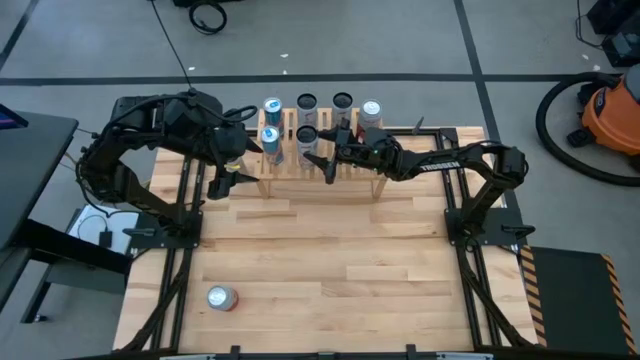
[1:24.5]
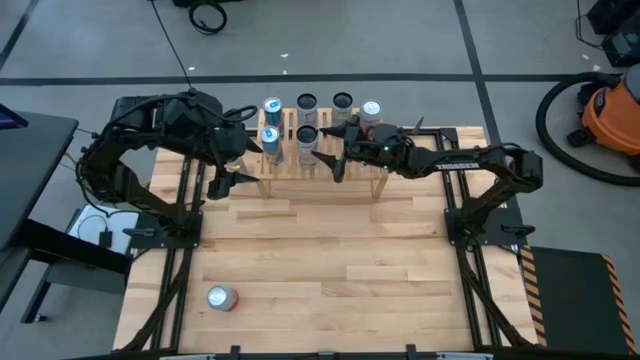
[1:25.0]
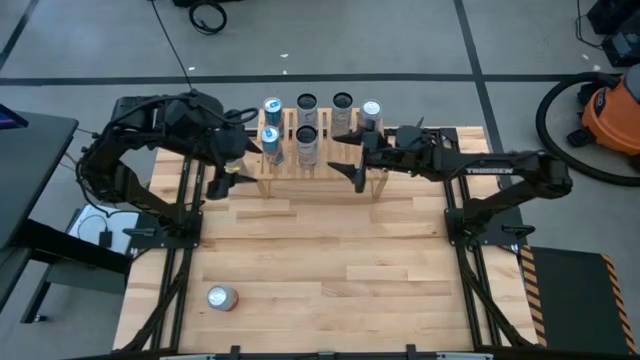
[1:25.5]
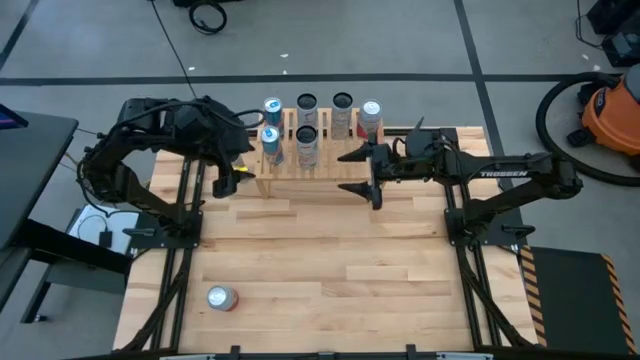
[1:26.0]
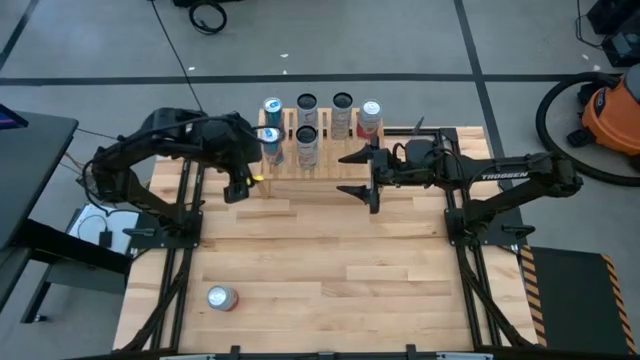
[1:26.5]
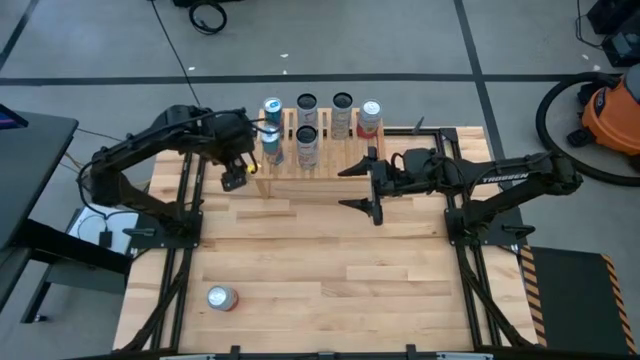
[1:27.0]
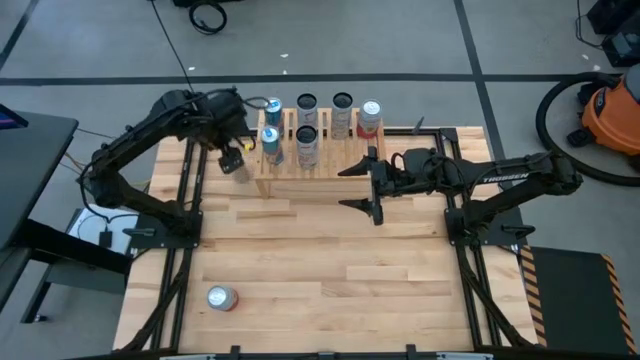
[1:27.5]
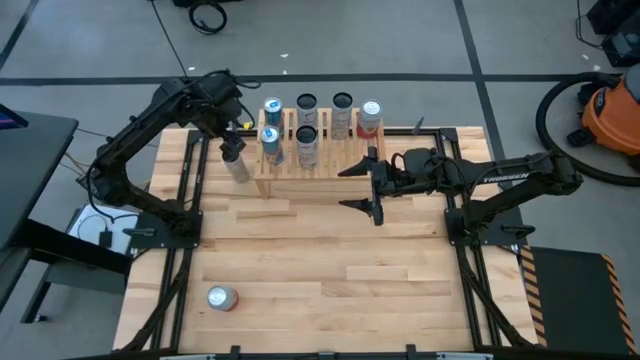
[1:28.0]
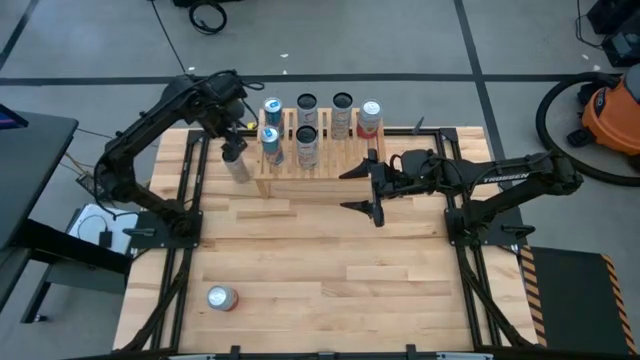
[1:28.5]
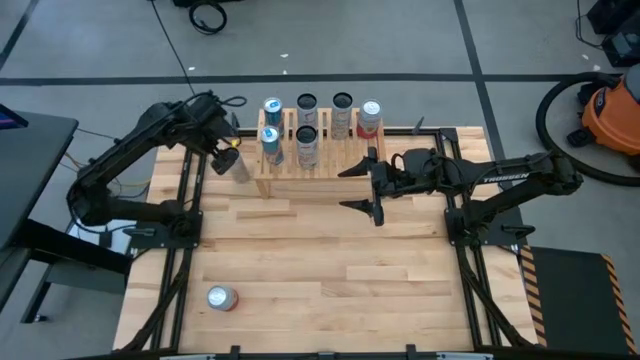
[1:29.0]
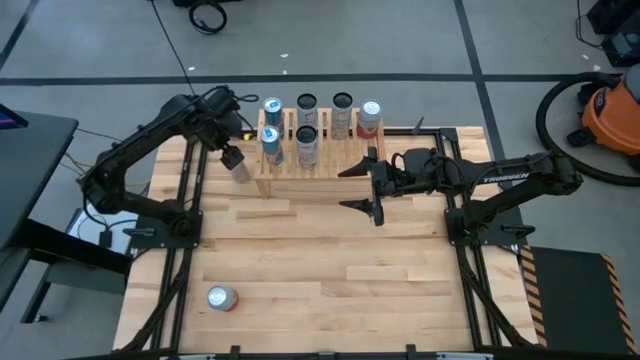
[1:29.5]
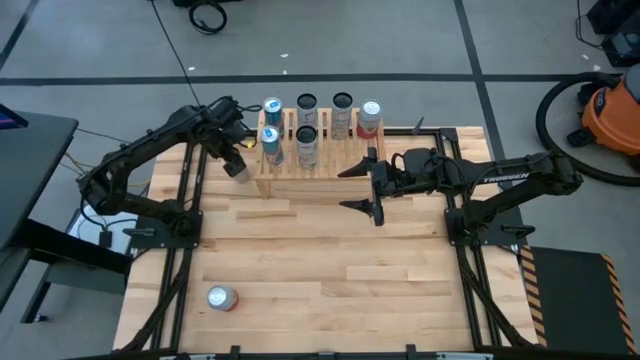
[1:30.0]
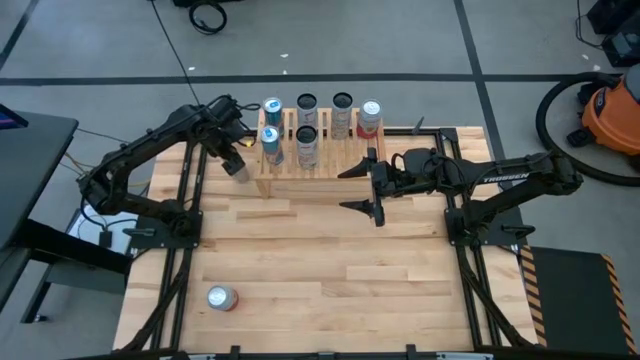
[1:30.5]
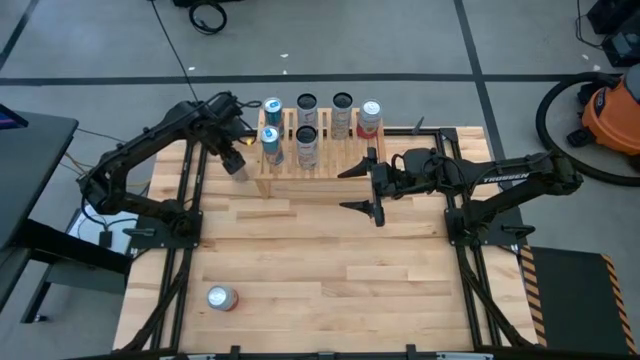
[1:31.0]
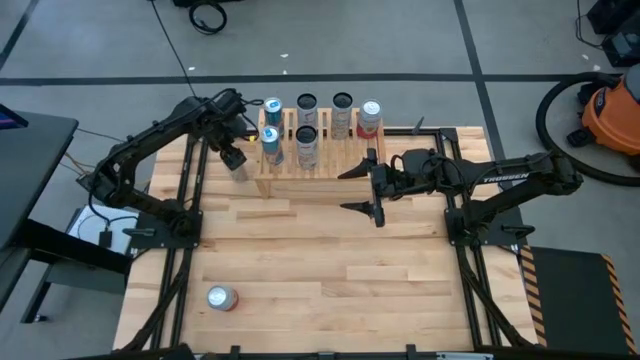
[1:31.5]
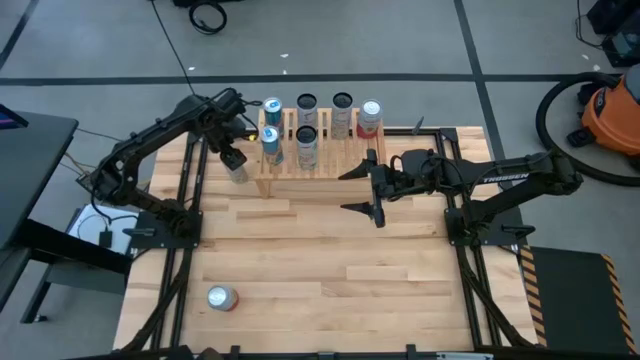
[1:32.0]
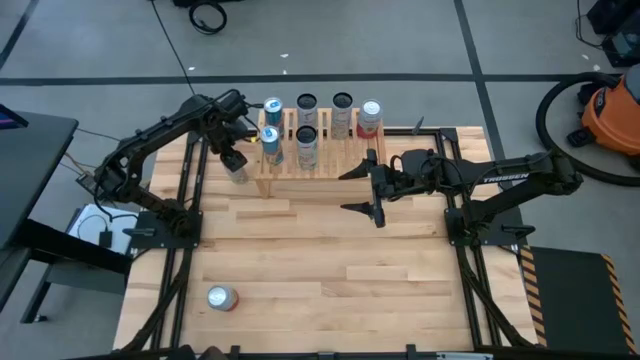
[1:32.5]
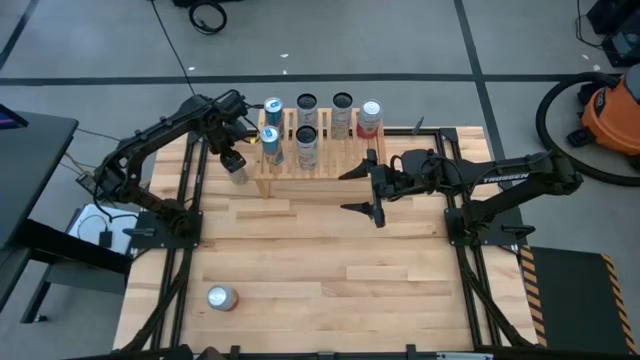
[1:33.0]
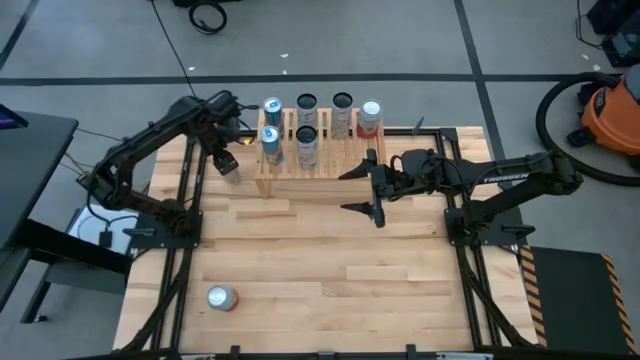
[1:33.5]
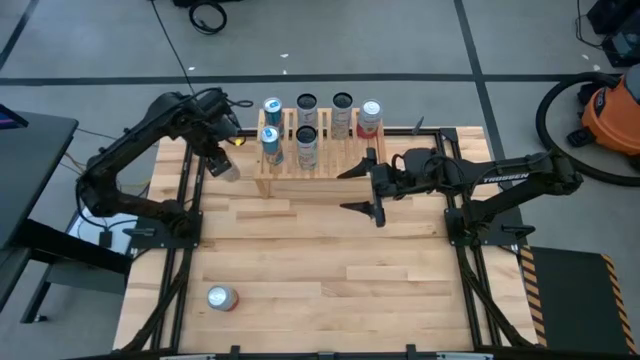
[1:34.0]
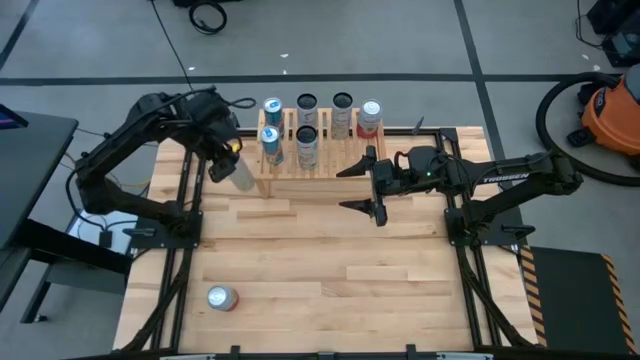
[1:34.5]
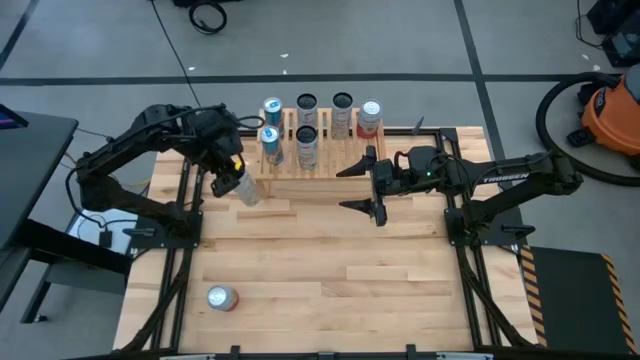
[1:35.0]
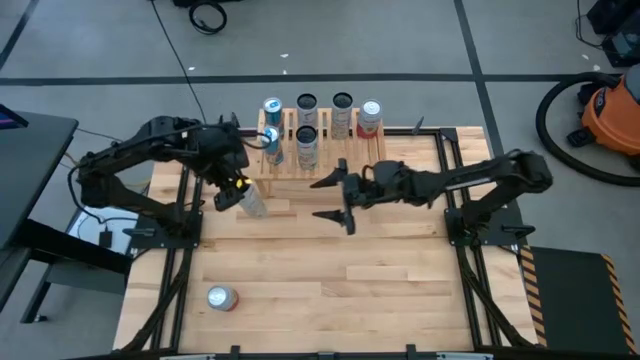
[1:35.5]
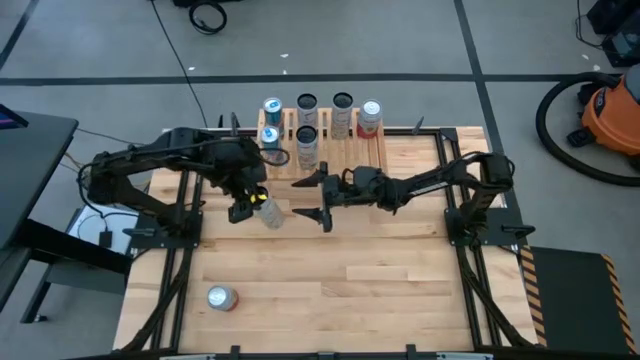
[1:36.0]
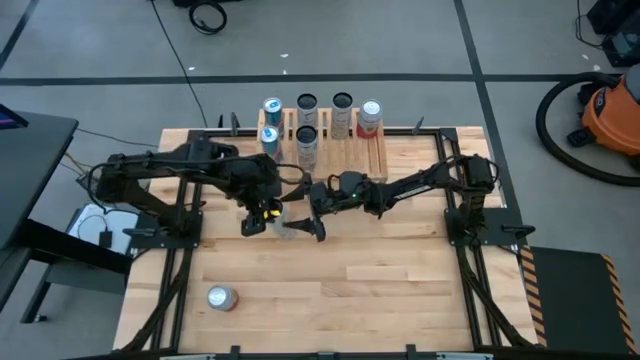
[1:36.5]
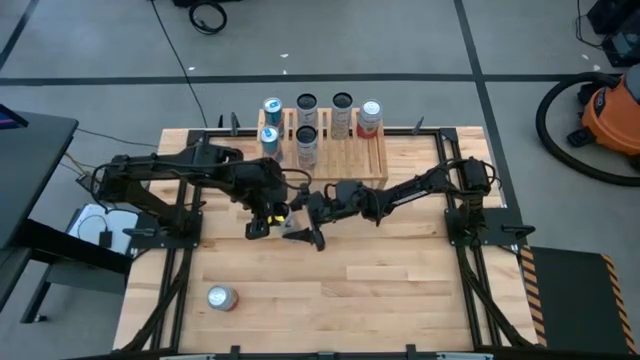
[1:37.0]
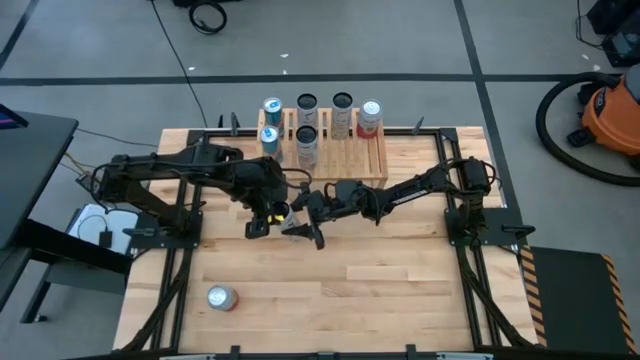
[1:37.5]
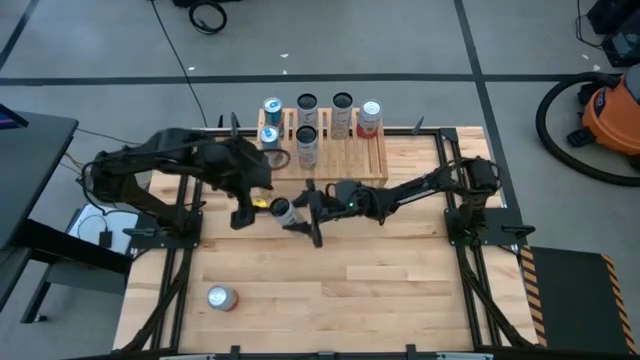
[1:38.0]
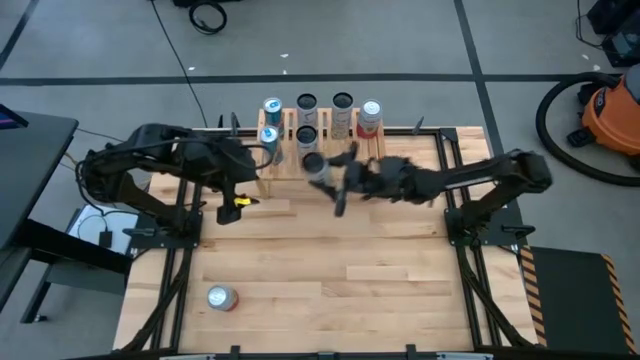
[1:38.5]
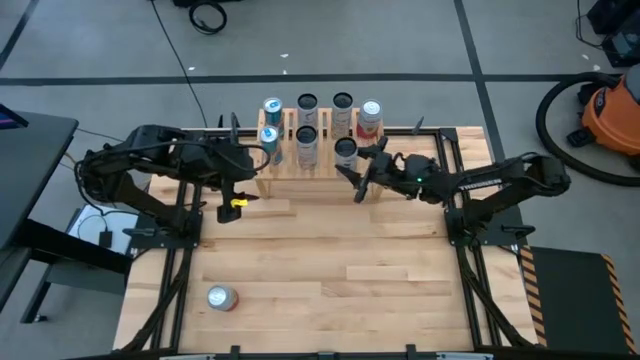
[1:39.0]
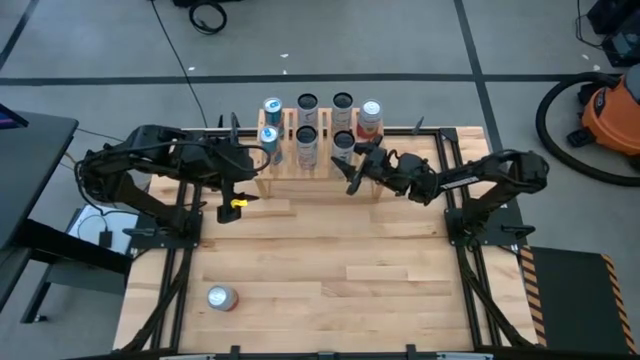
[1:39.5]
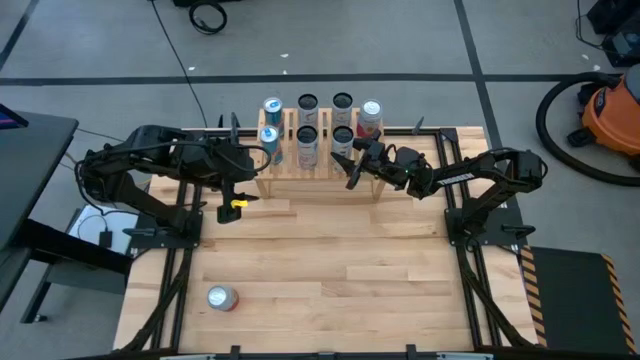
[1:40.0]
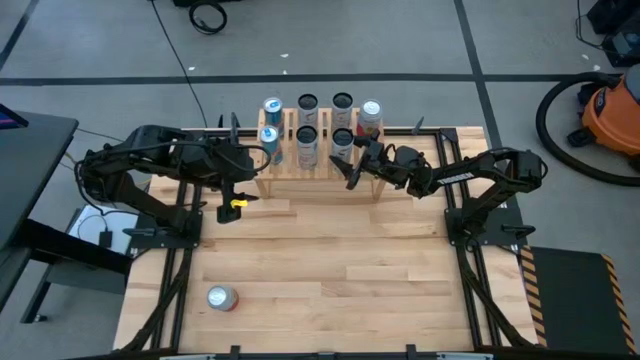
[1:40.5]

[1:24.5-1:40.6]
Task: Place canned beverage on shelf
Put the white yellow soda can on the shelf aligned with the other white yellow soda can

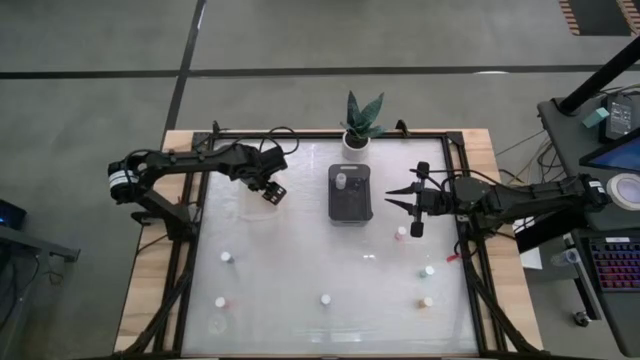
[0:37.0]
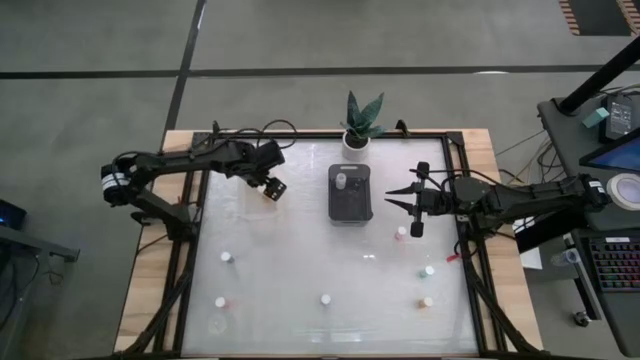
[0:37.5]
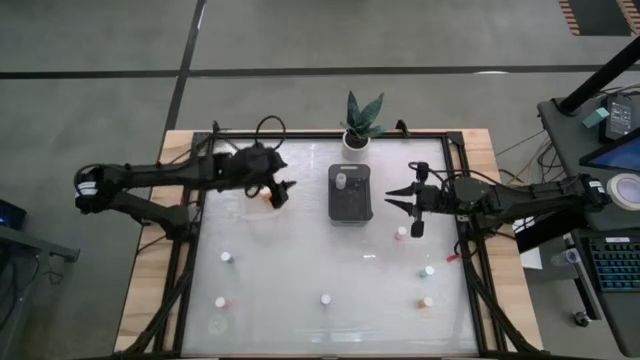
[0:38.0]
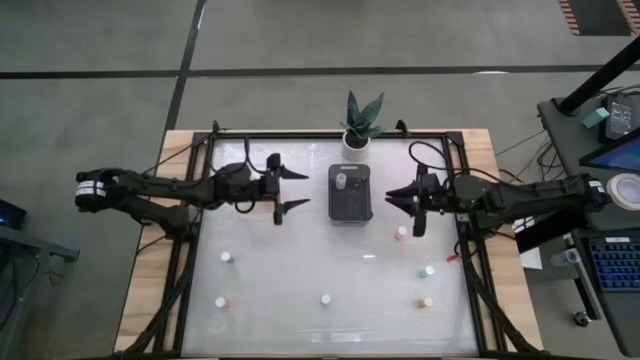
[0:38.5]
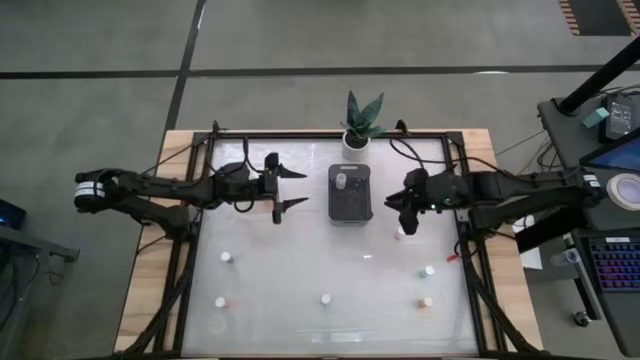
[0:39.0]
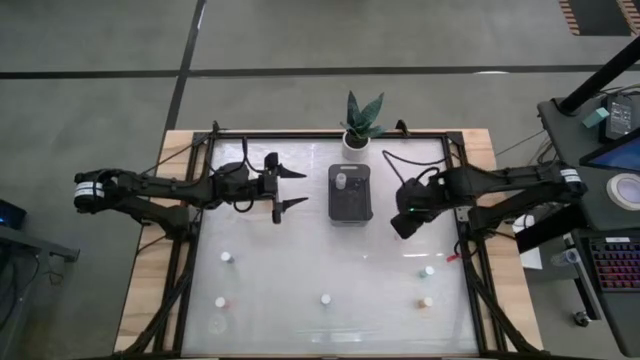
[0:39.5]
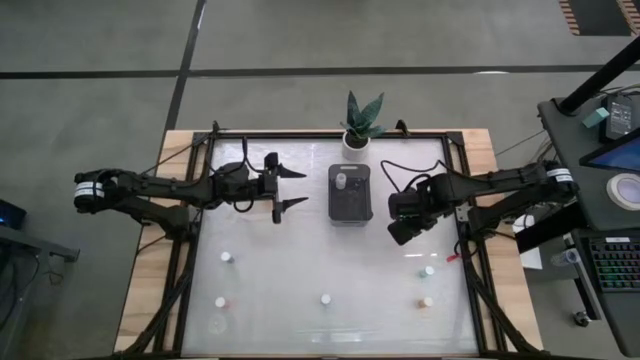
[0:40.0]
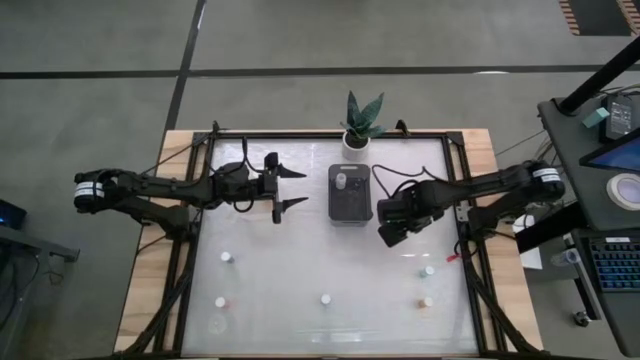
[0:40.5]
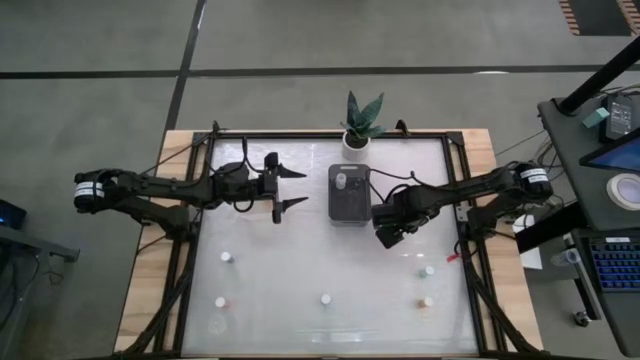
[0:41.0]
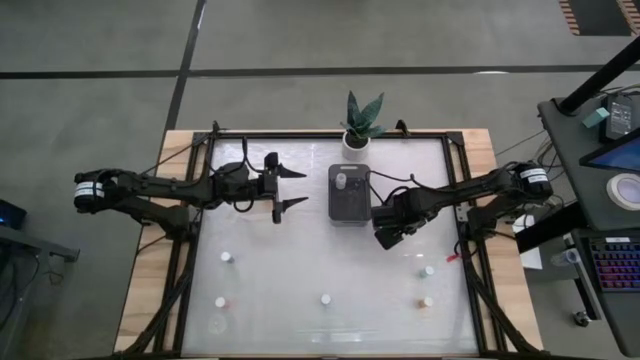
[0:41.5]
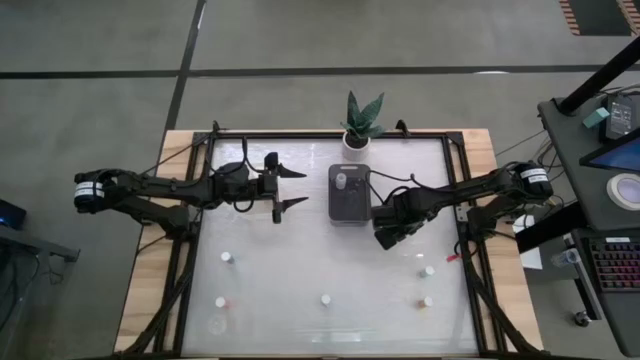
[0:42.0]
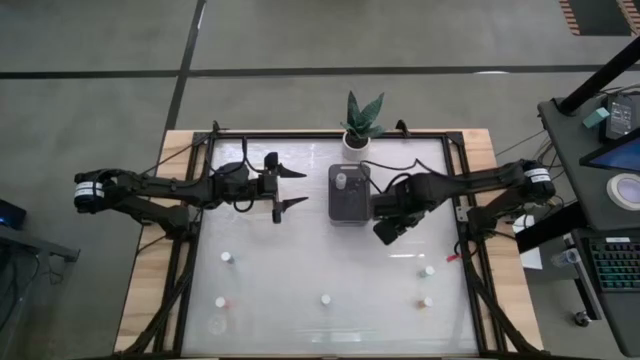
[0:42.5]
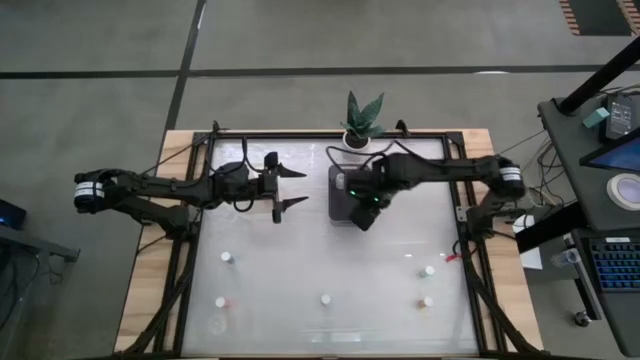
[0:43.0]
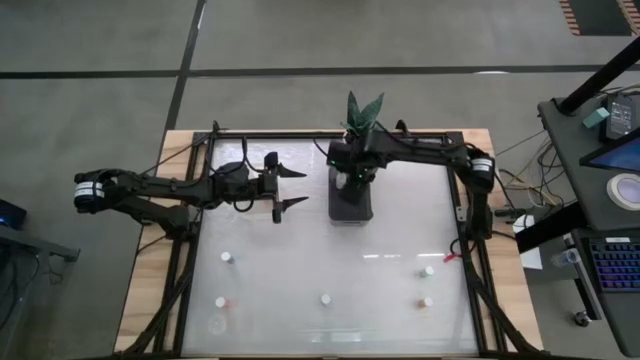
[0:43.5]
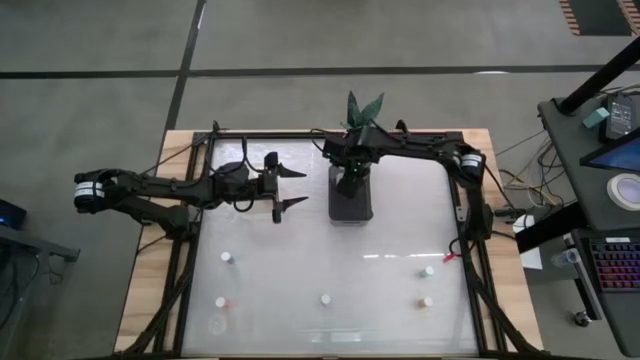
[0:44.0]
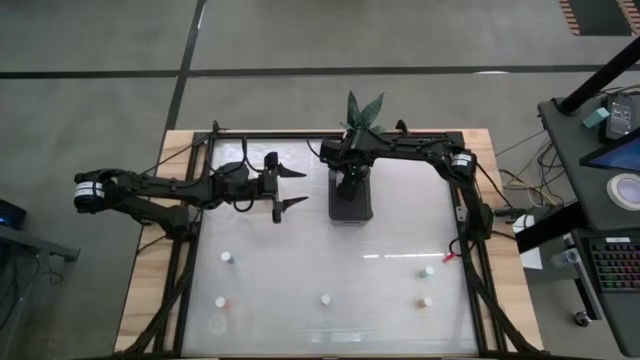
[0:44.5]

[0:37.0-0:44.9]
Task: Pick and place medicine bottles into bin by pill shape (circle, oval)
Put the middle right pink pill bottle into the black bin
